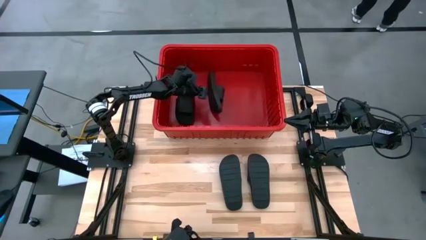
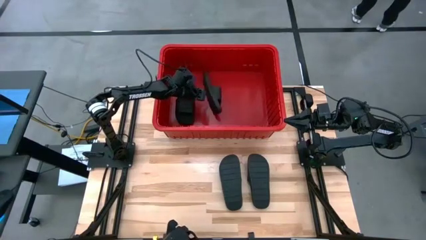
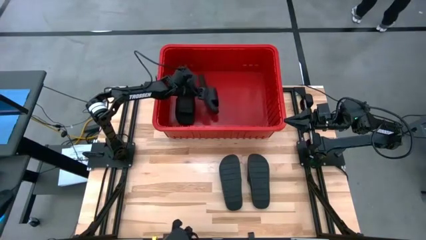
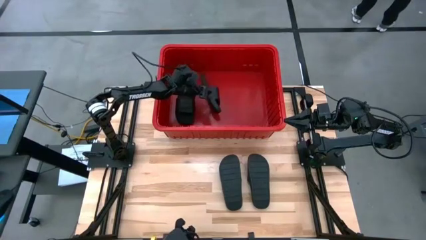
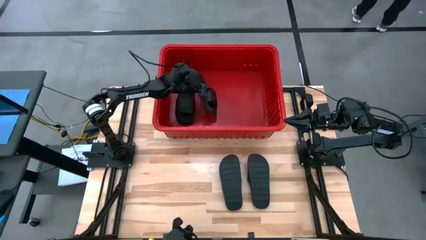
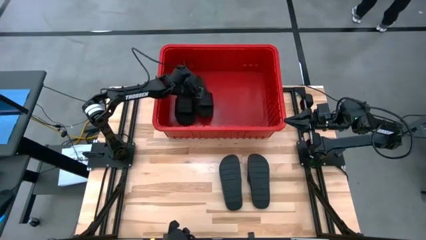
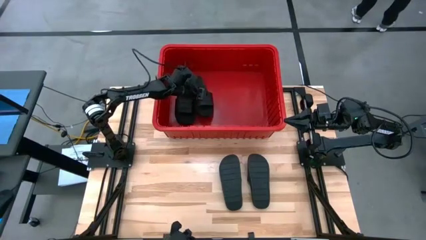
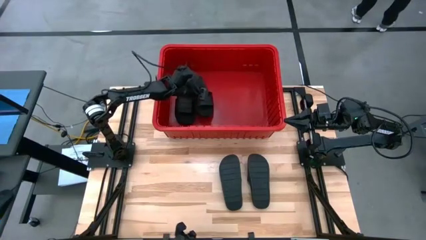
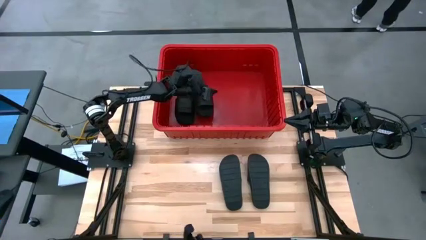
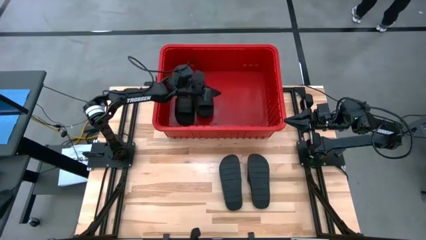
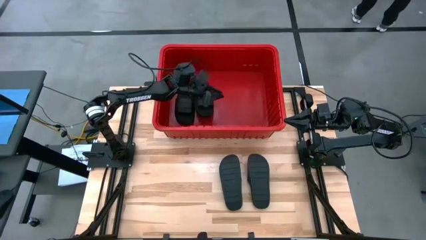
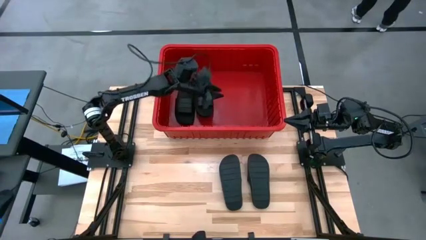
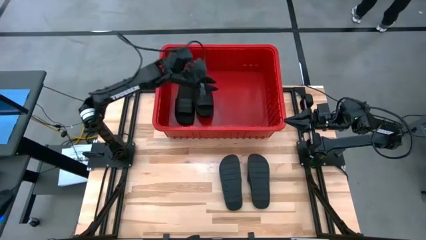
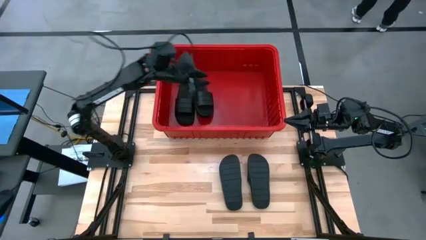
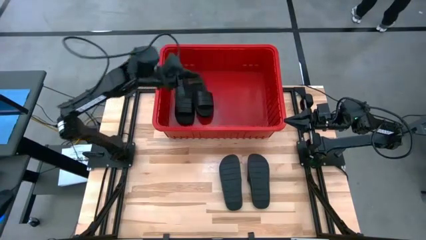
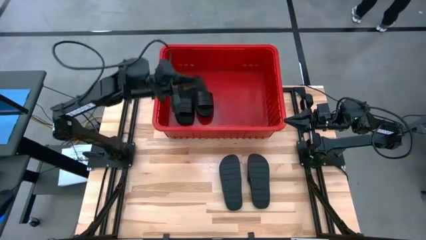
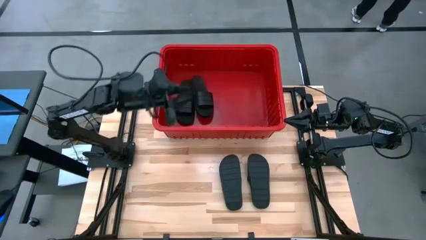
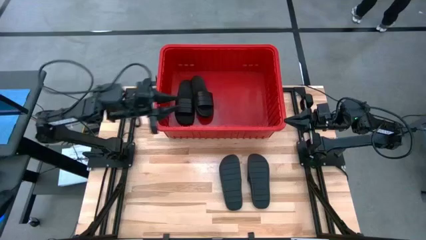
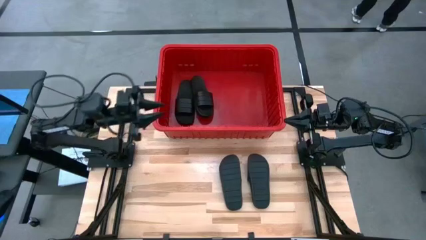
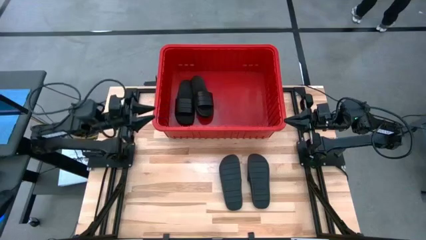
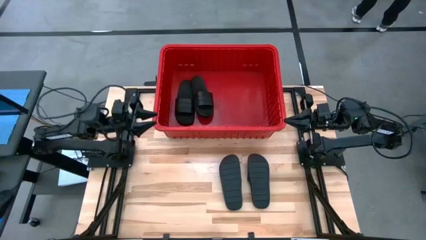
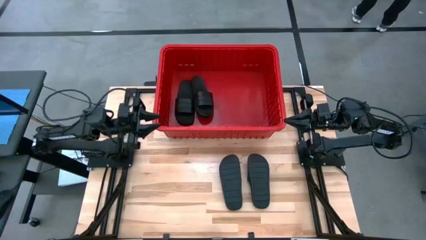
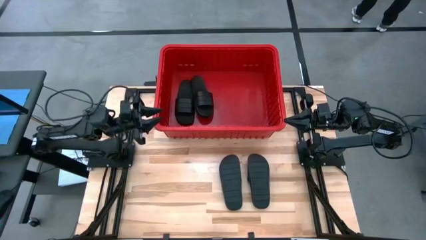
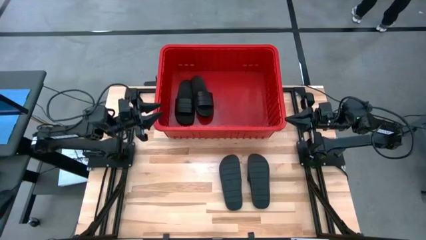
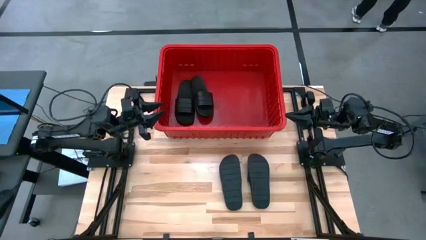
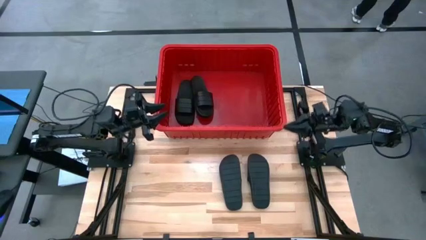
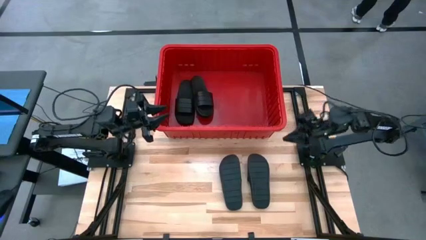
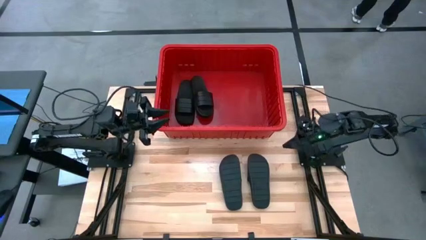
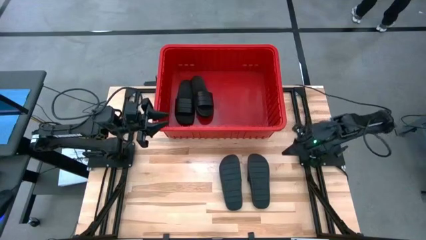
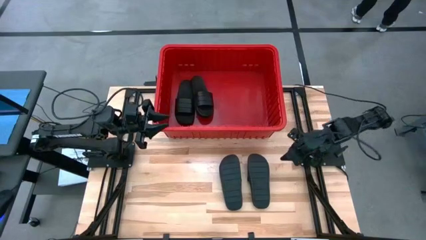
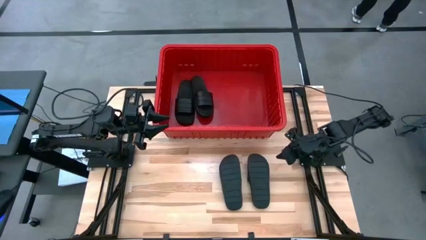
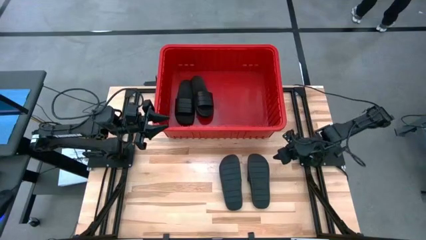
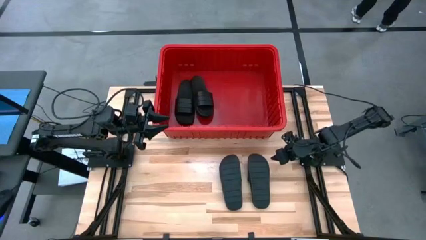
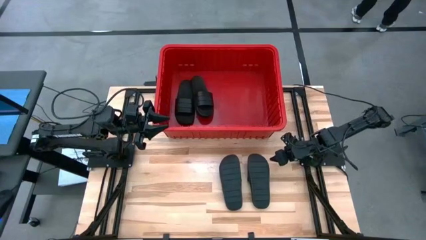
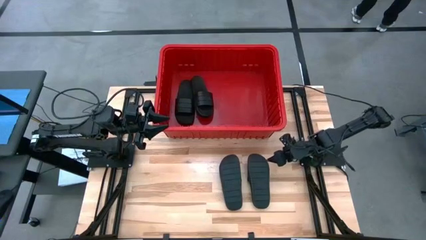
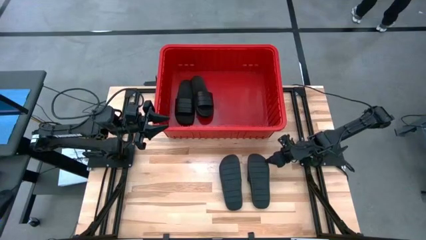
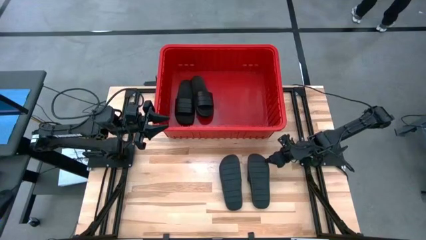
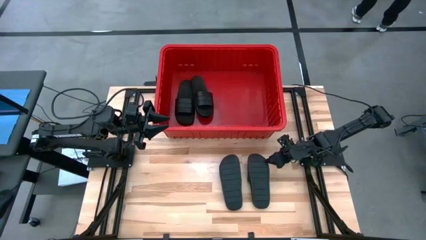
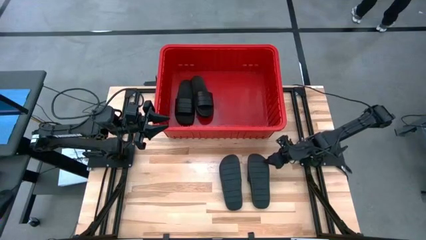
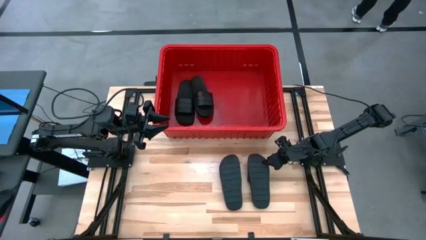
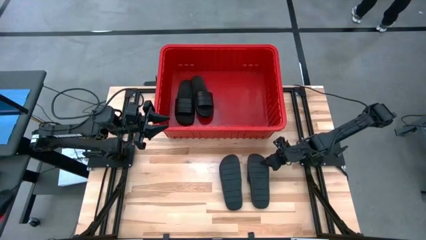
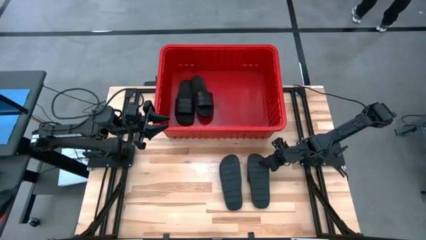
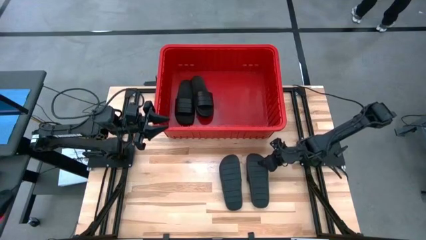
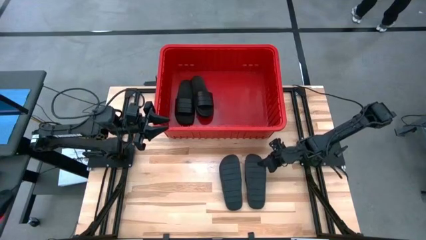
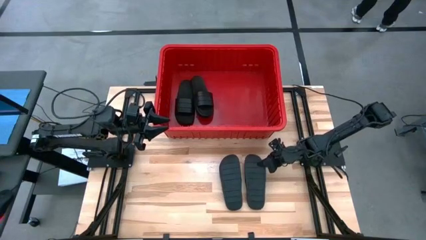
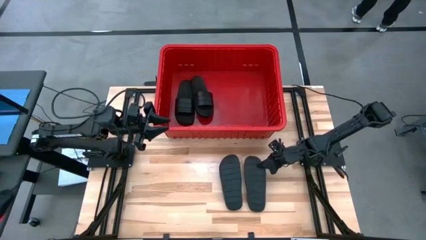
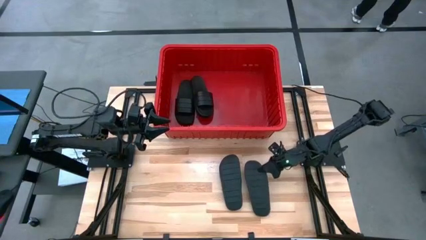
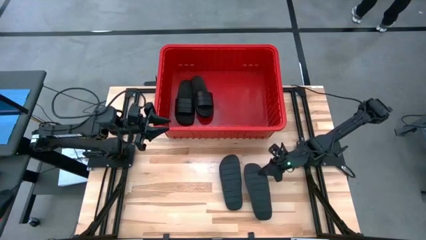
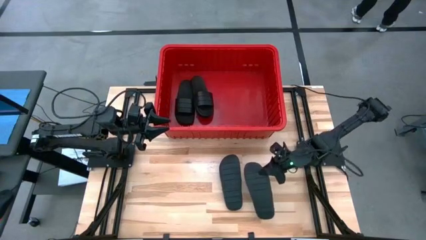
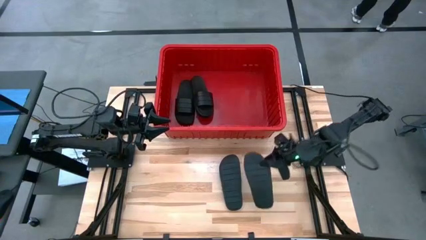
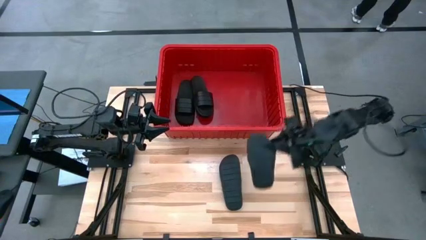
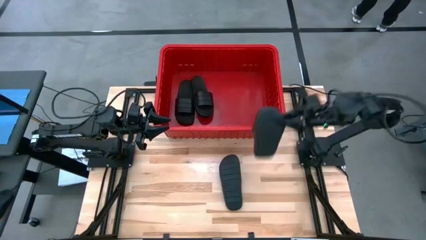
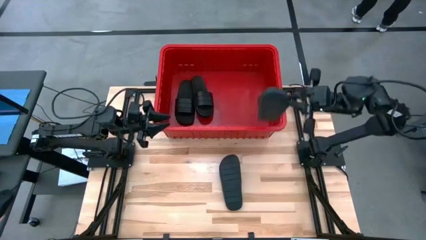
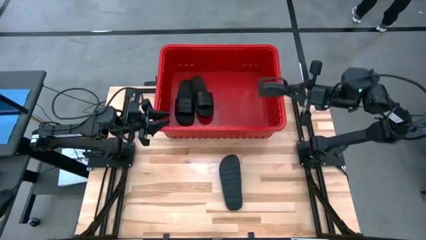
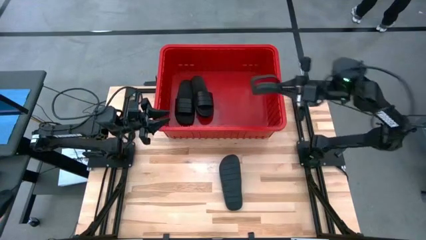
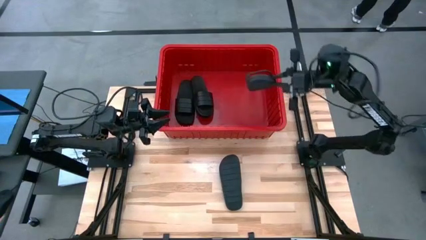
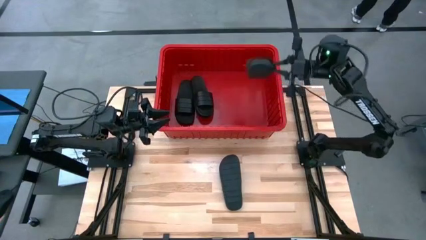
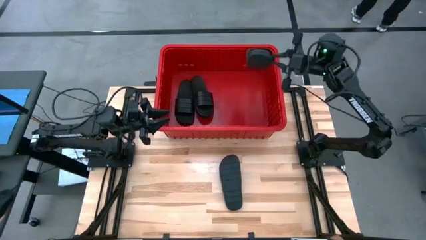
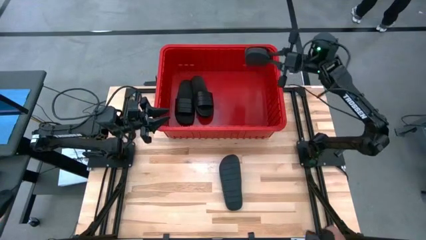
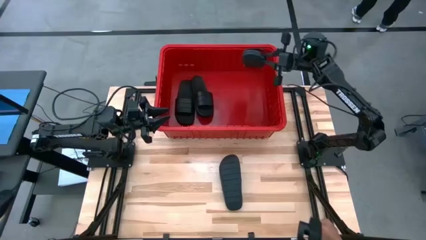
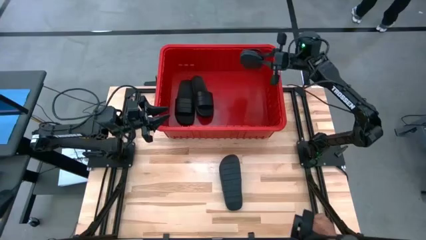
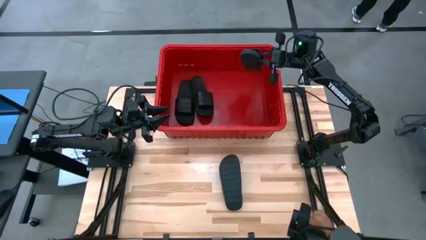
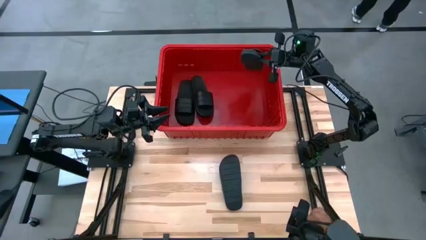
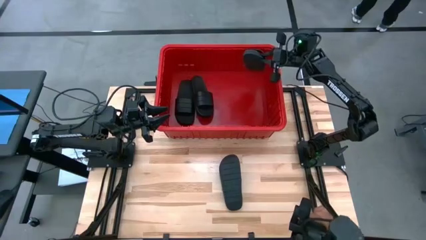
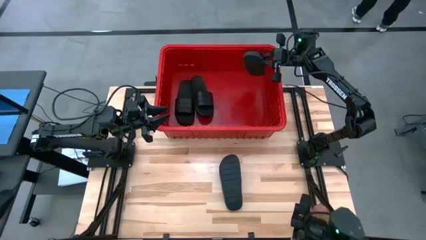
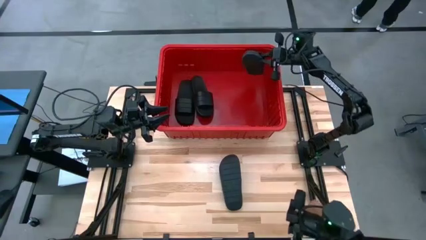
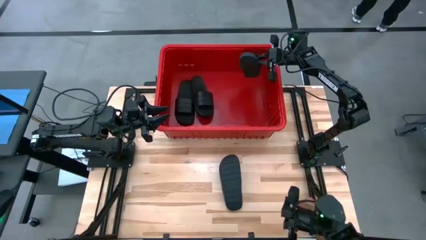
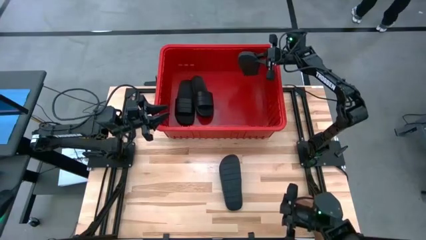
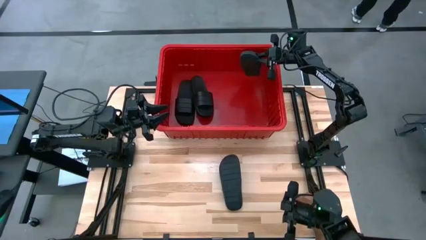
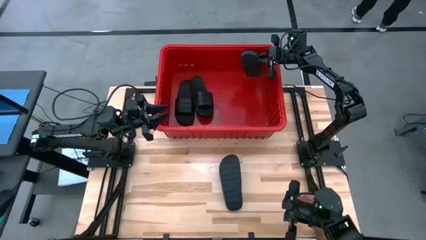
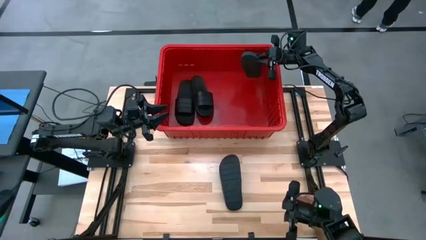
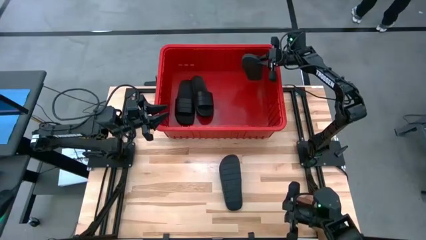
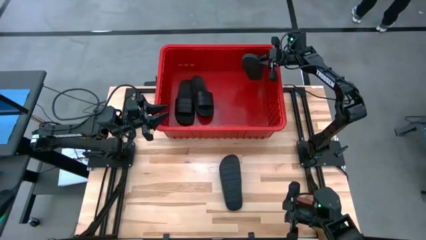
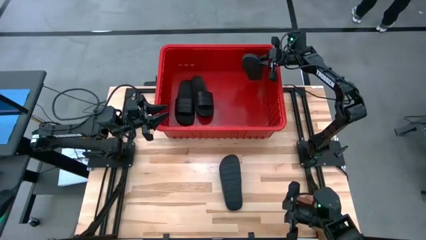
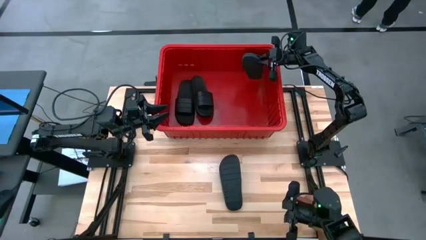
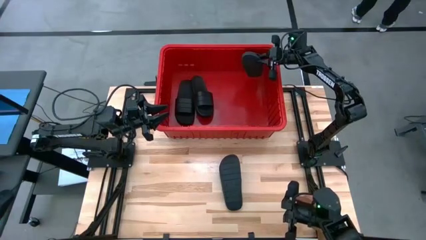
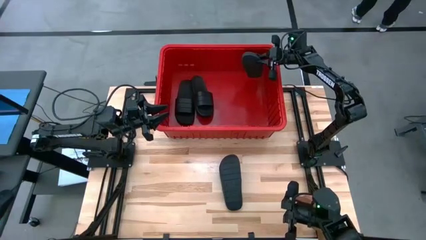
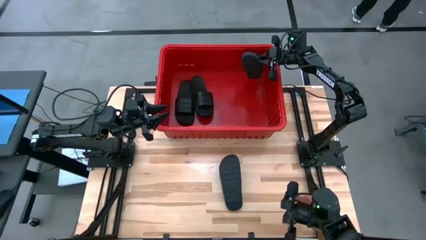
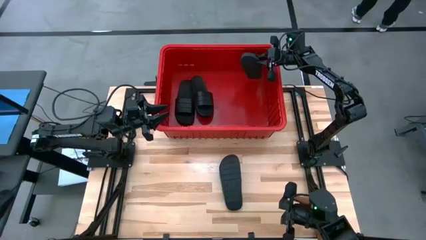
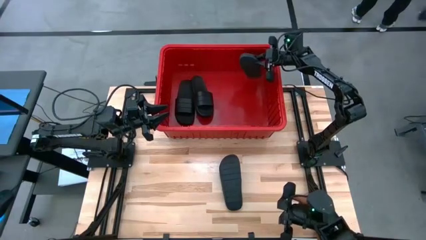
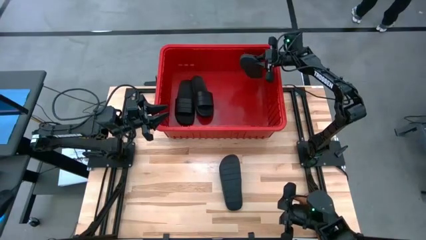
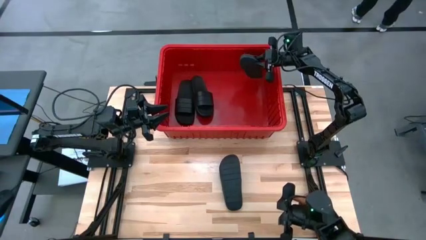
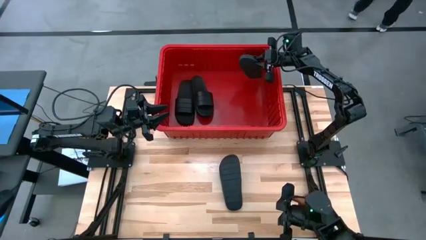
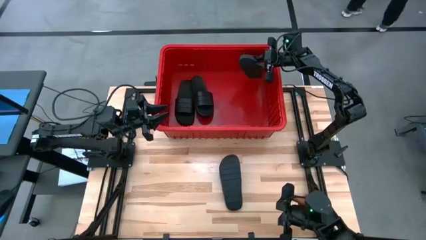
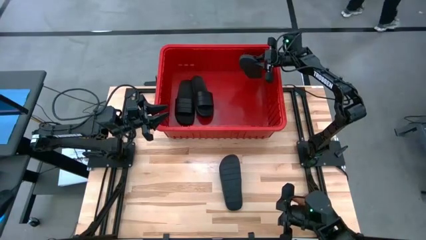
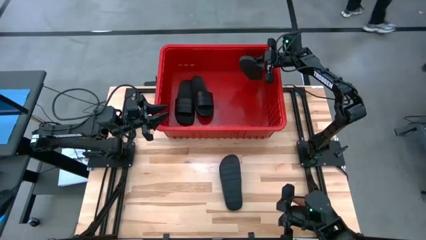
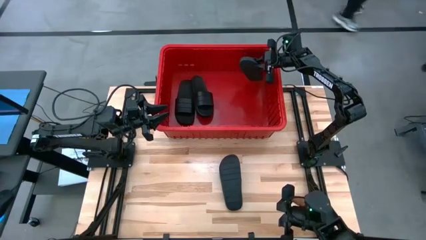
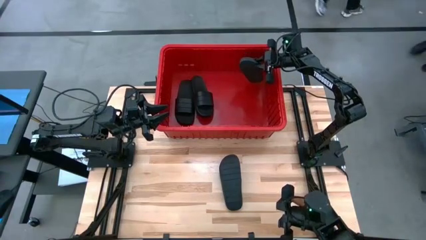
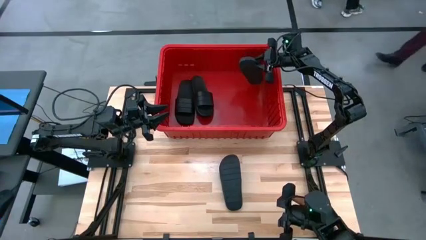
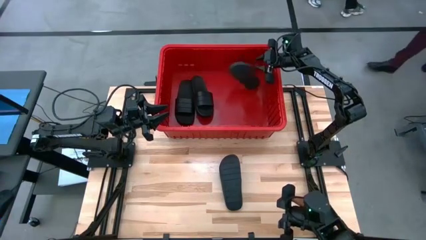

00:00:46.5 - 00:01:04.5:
Task: Pick and place slides into bin
Put the black slide into the red bin
